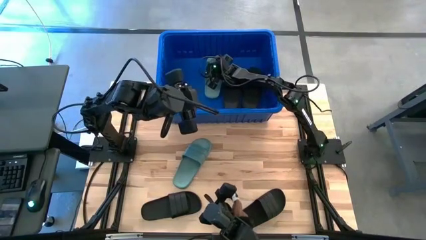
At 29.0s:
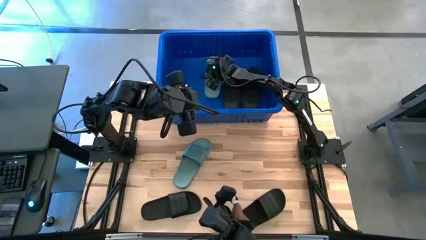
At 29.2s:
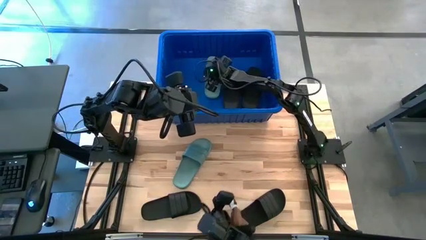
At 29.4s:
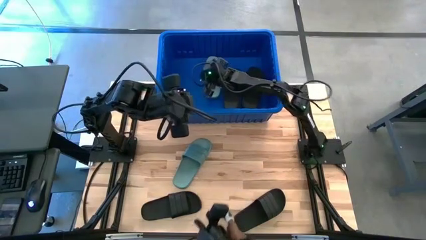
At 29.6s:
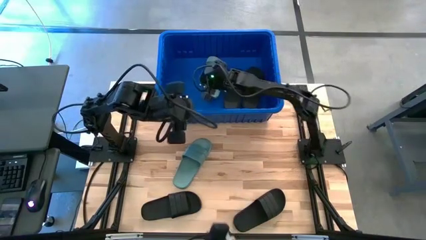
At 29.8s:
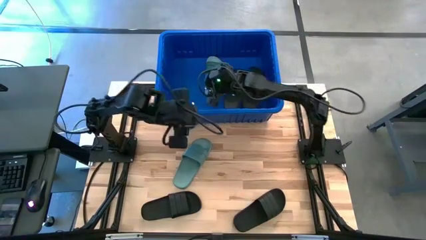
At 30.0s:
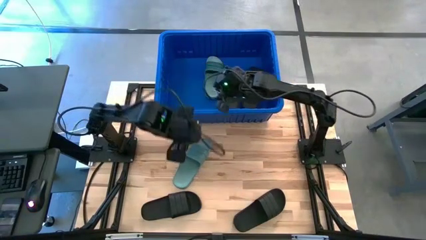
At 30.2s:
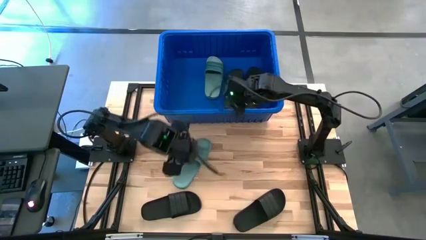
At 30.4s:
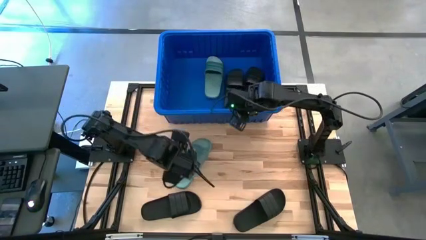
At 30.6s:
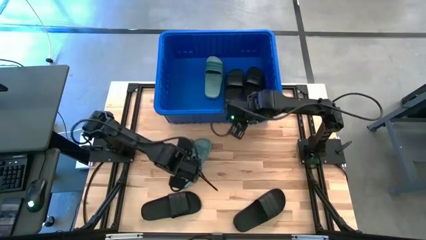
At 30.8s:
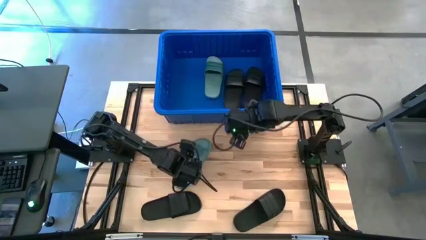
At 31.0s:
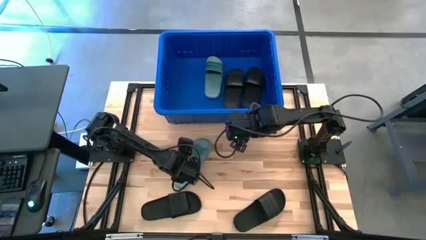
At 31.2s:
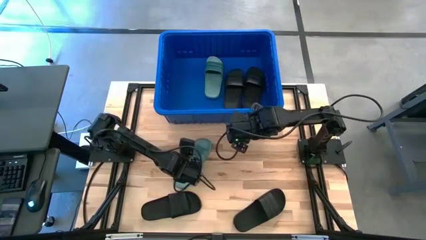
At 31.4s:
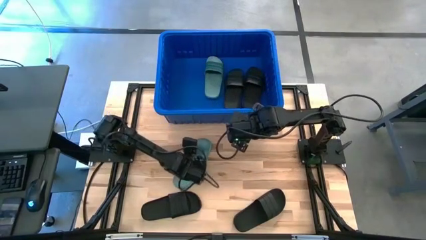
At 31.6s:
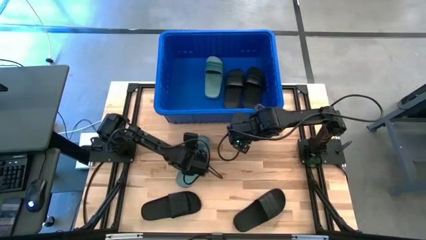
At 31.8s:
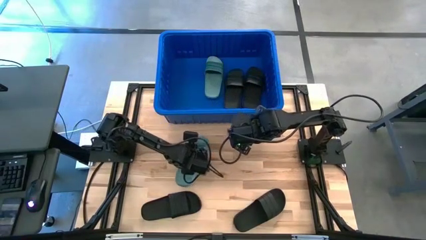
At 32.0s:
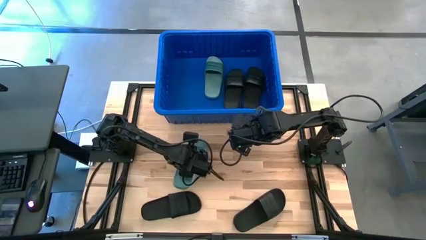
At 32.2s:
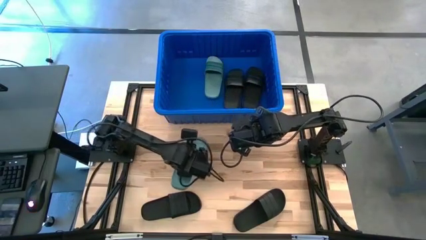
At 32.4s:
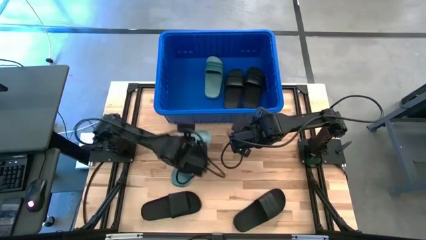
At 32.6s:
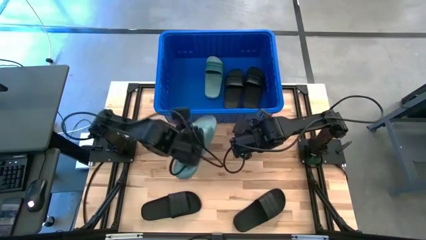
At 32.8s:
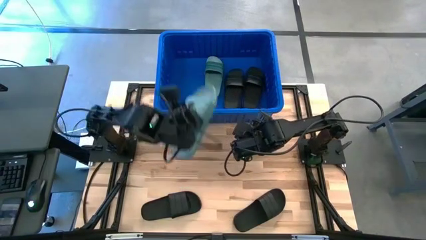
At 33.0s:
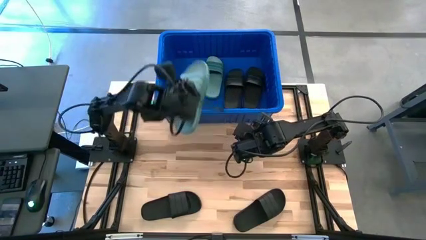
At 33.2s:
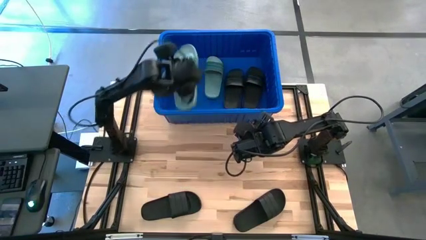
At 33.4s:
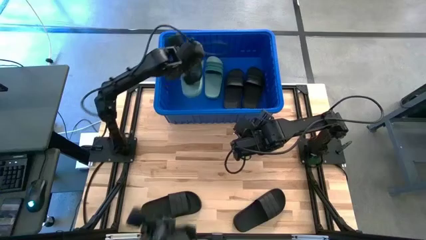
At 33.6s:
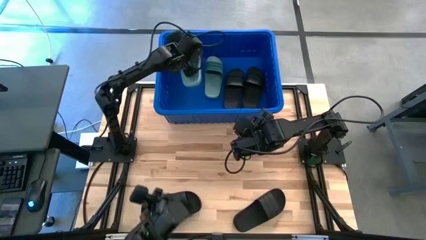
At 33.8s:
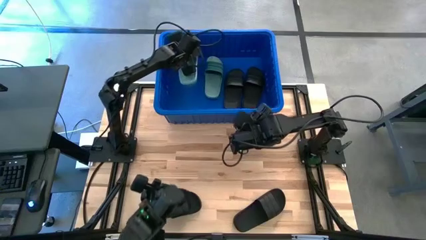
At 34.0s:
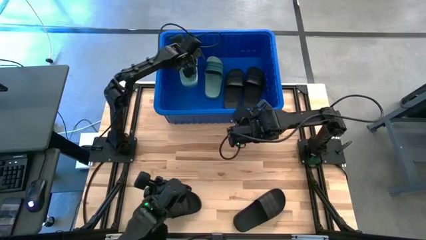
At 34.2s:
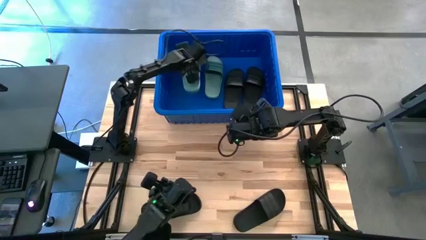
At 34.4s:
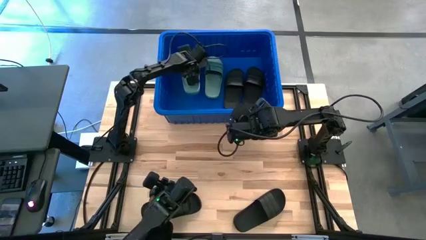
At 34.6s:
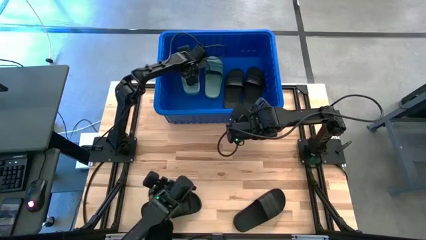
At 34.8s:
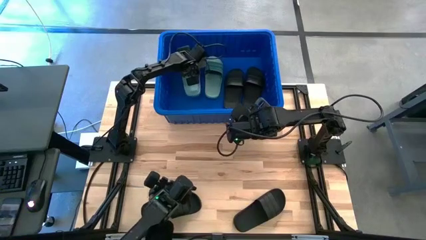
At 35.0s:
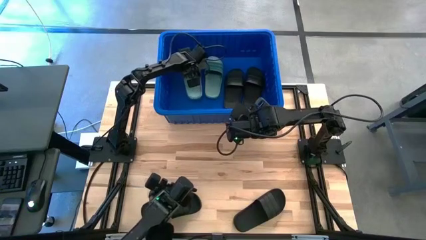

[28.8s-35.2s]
Task: Pick and place slides into bin
Put the green slide into the bin

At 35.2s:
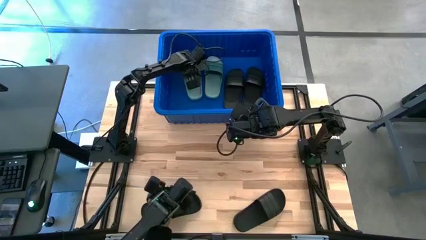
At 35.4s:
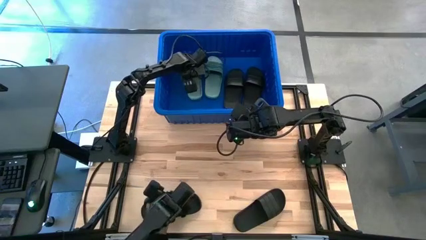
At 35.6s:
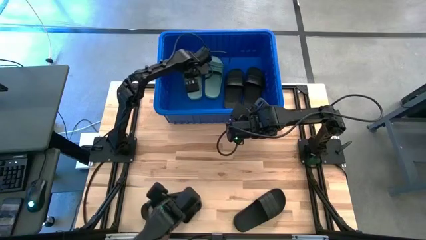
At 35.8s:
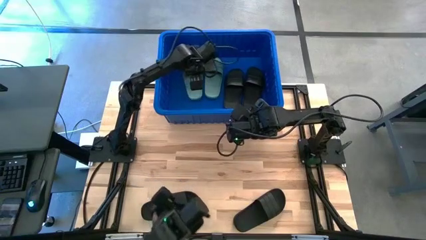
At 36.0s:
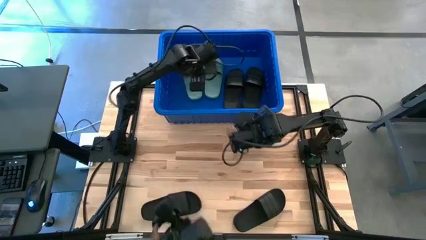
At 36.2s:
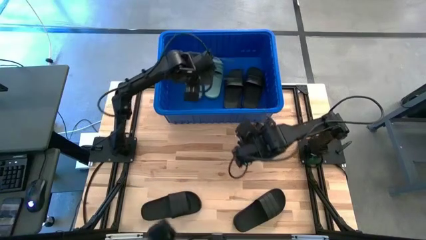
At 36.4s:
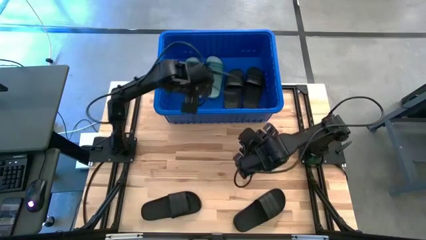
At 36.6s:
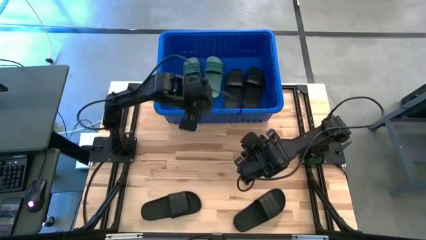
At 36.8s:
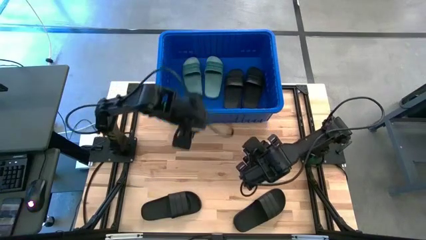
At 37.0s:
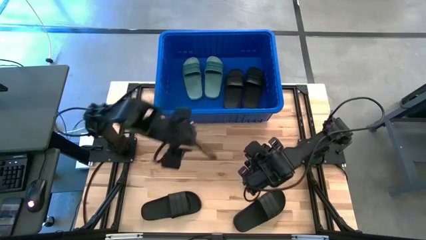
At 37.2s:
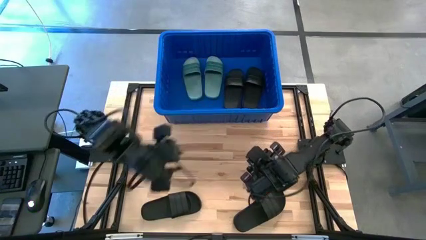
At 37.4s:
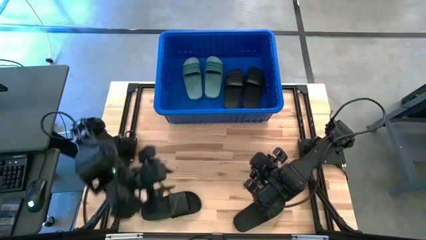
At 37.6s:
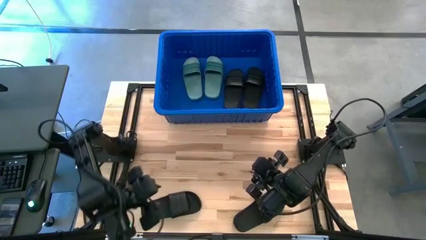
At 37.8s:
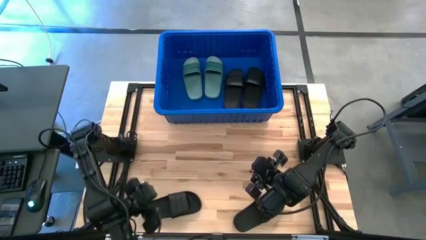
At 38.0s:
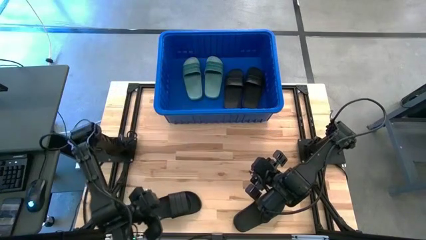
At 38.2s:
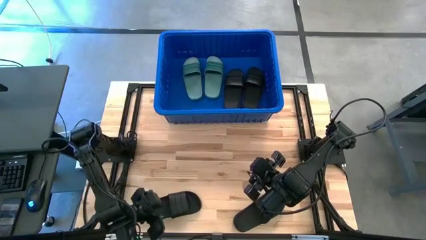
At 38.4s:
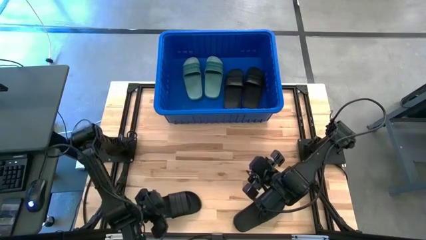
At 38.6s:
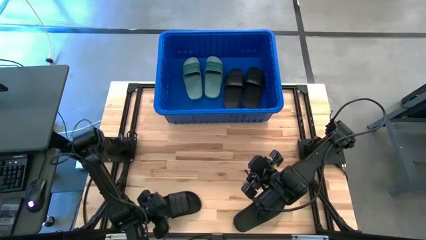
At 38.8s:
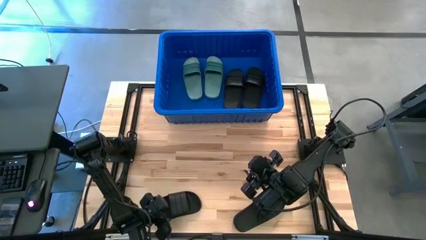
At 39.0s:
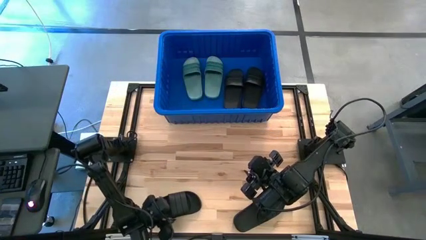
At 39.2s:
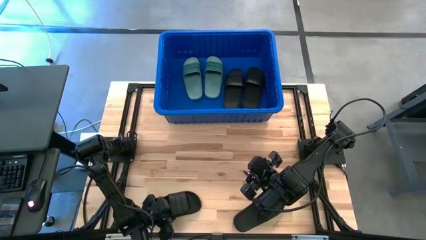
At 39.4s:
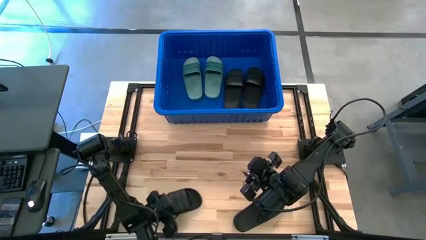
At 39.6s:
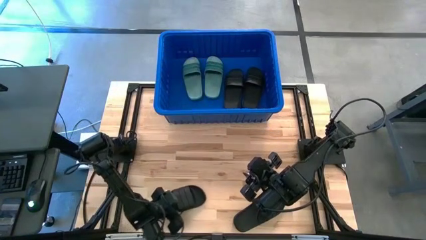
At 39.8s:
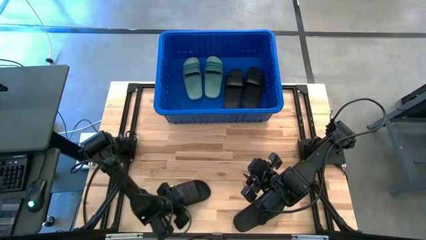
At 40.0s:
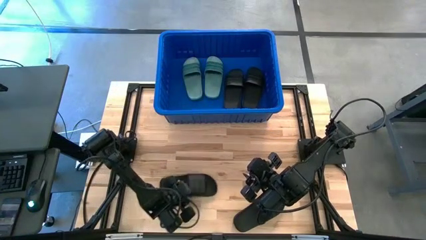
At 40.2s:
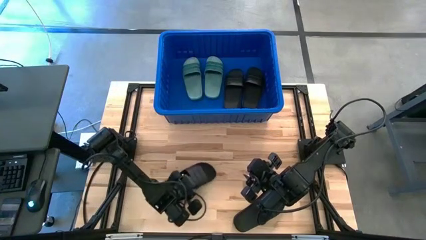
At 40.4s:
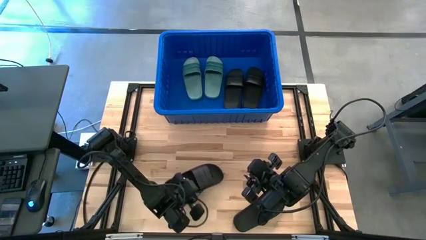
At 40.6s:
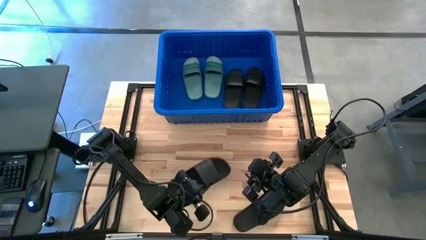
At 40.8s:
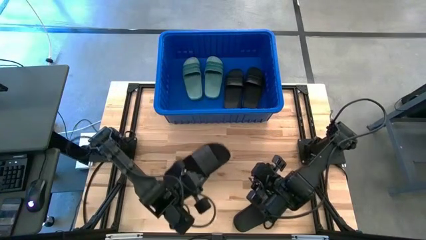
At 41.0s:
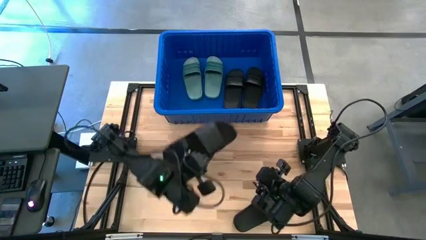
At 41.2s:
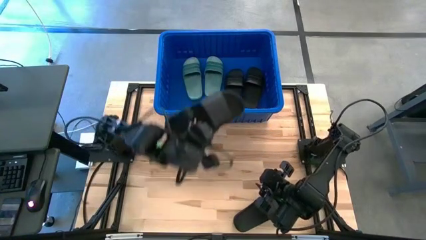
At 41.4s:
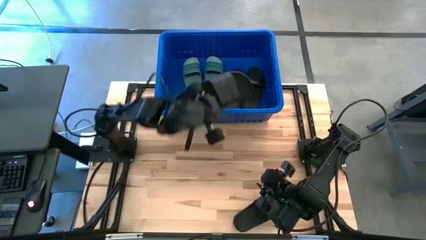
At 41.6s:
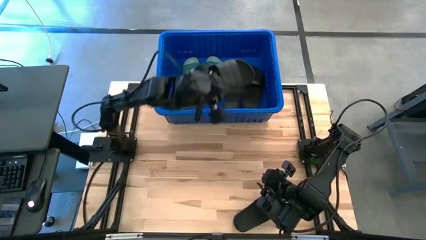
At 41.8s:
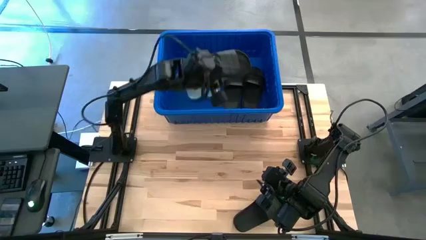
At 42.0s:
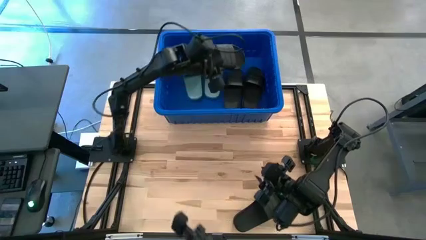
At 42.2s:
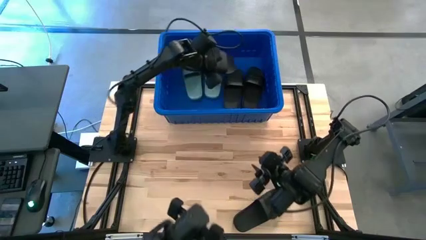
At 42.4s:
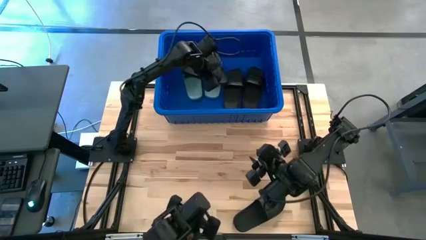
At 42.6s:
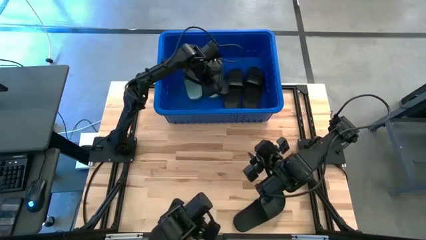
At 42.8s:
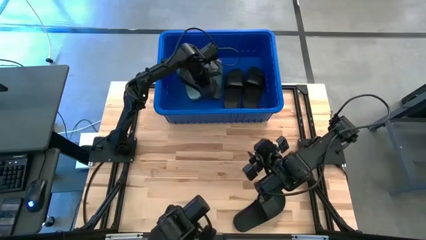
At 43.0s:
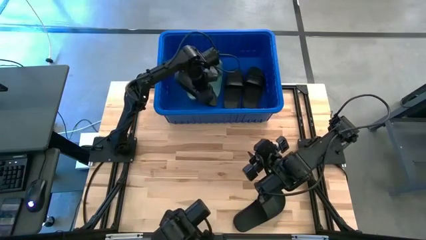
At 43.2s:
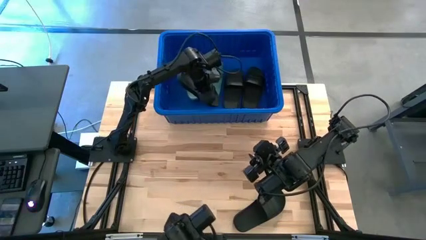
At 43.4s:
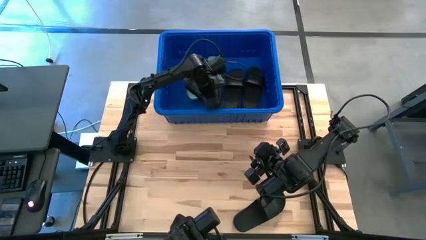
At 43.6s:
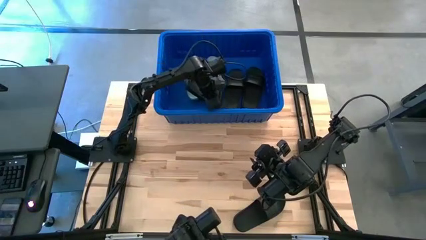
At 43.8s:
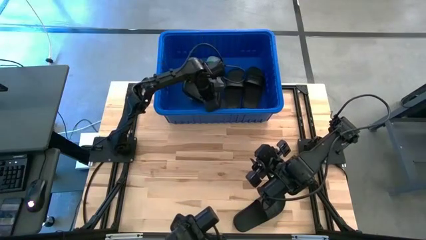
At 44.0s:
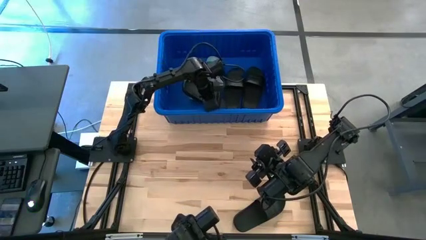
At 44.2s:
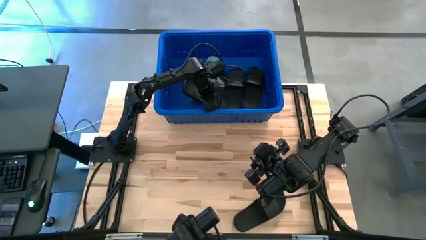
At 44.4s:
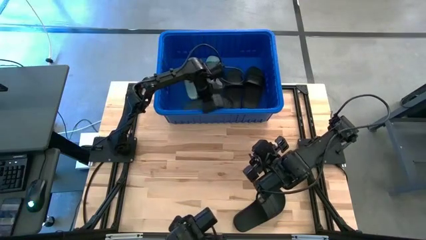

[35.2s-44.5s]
Put the left black slide into the bin
